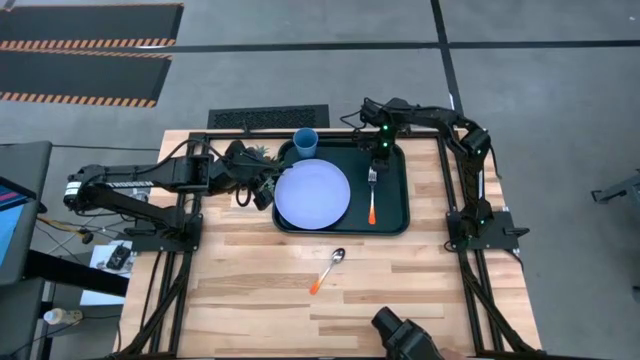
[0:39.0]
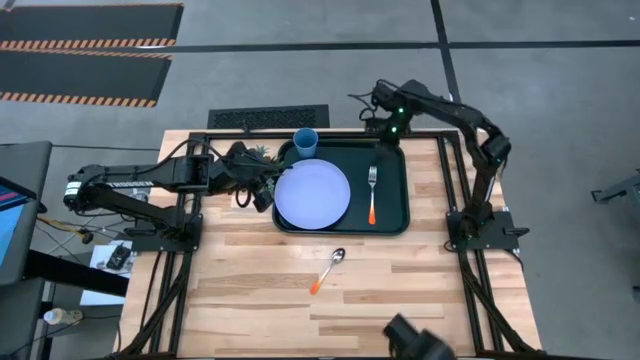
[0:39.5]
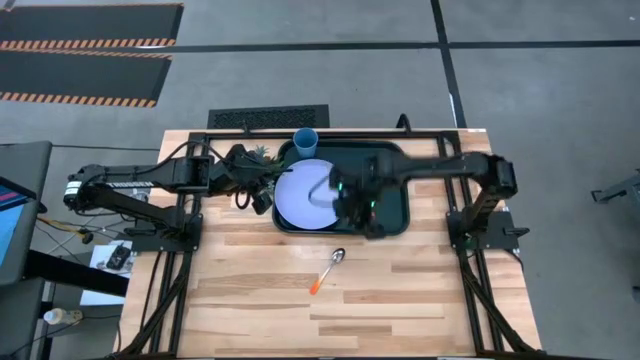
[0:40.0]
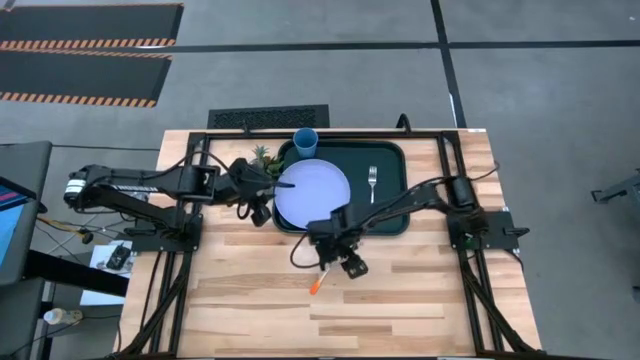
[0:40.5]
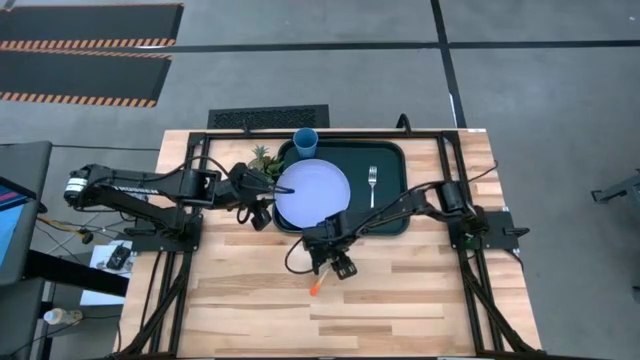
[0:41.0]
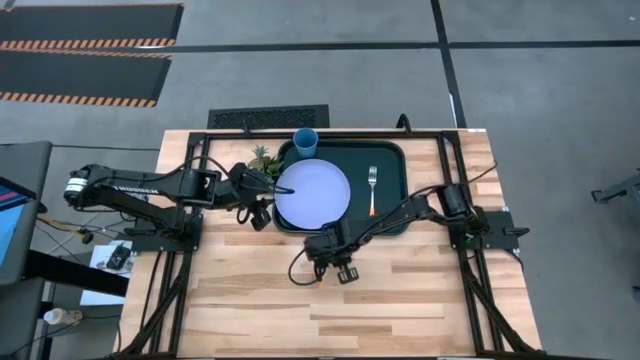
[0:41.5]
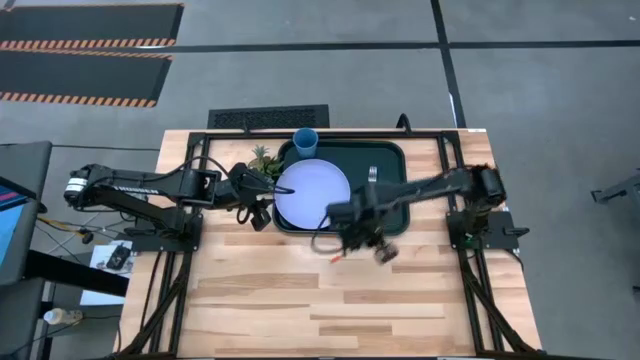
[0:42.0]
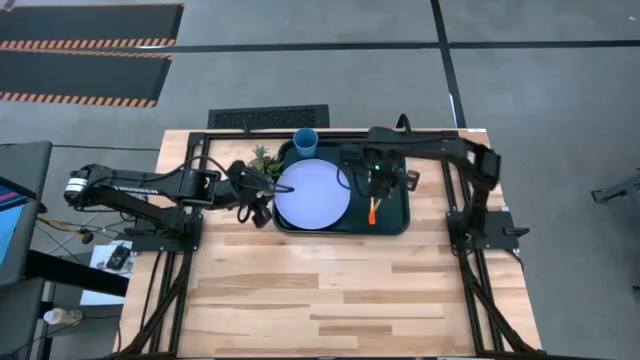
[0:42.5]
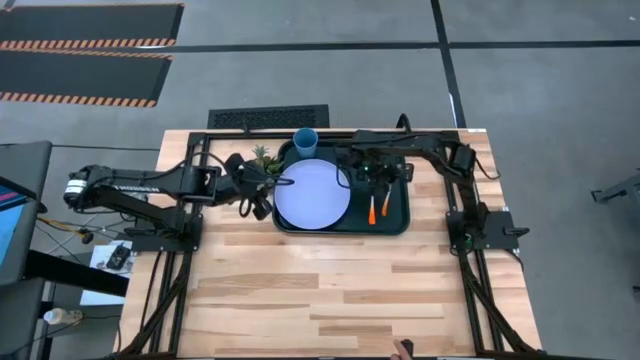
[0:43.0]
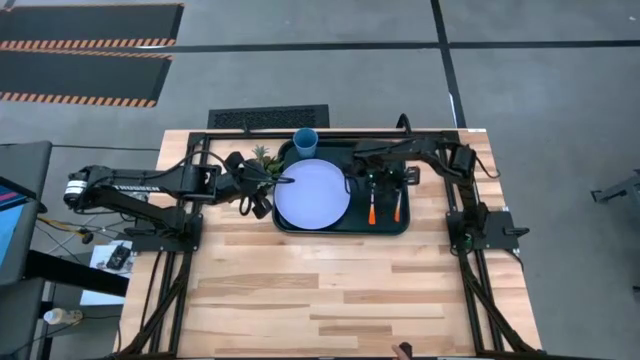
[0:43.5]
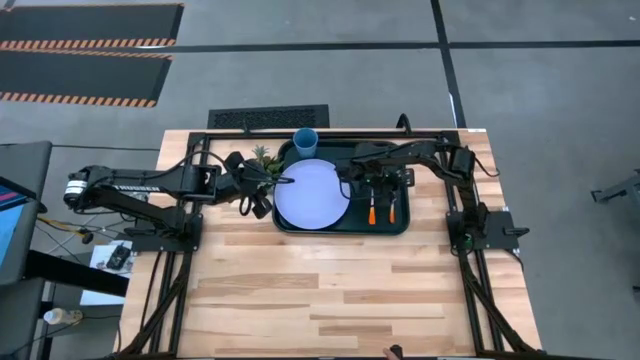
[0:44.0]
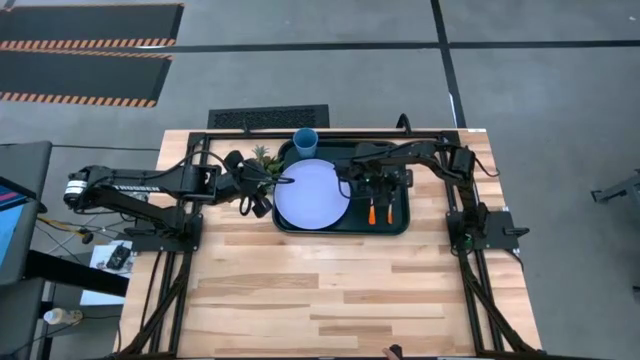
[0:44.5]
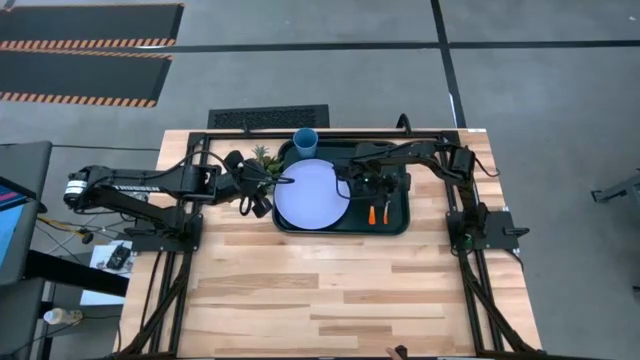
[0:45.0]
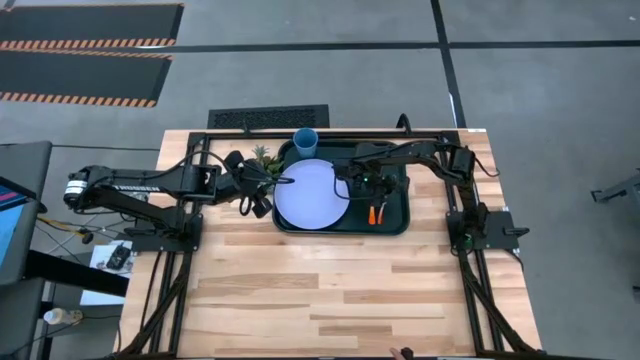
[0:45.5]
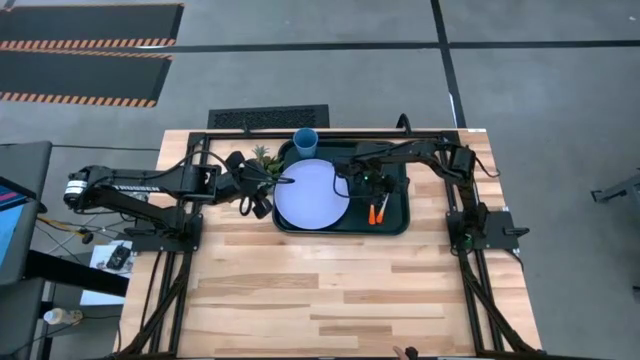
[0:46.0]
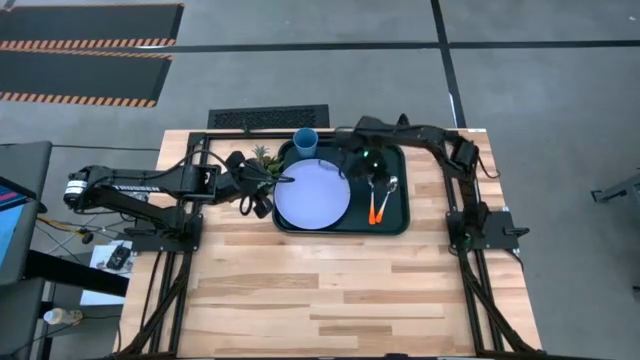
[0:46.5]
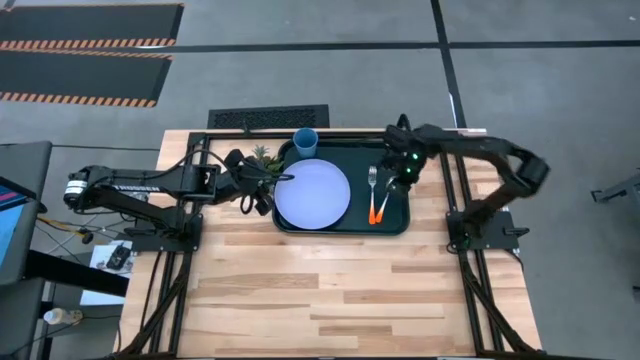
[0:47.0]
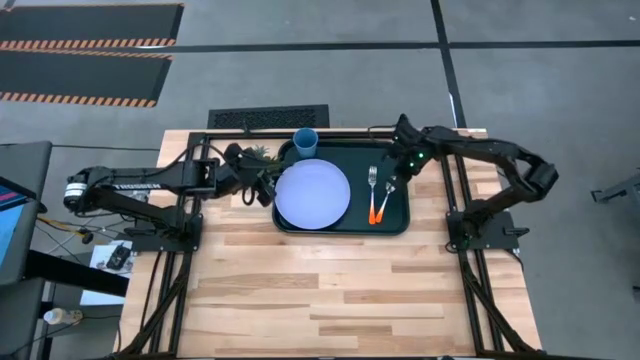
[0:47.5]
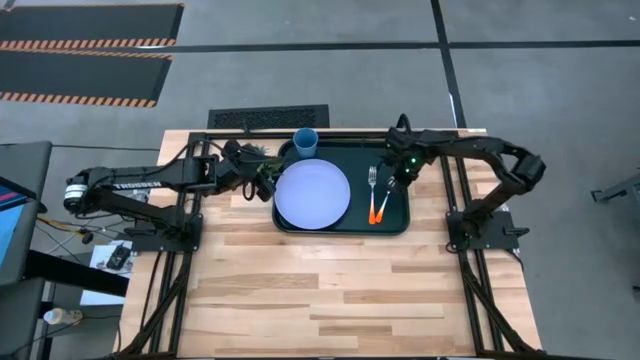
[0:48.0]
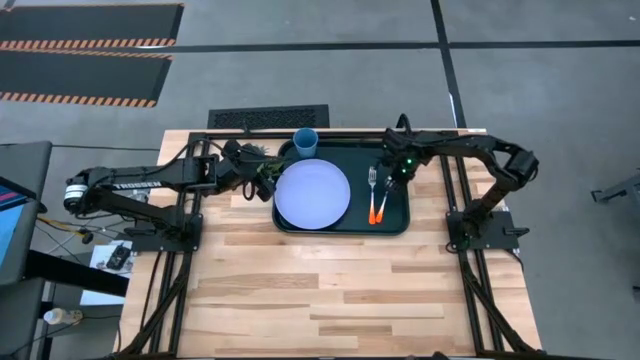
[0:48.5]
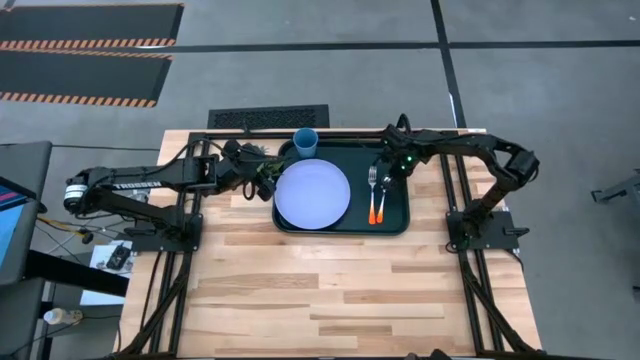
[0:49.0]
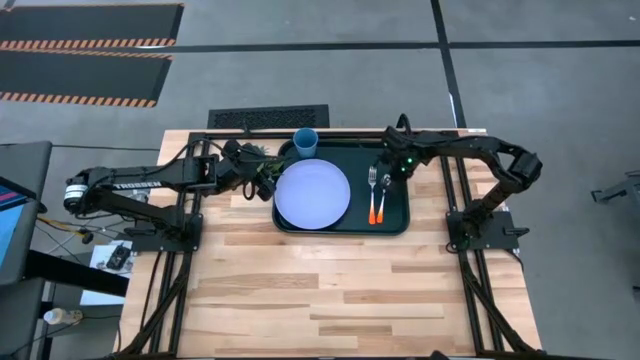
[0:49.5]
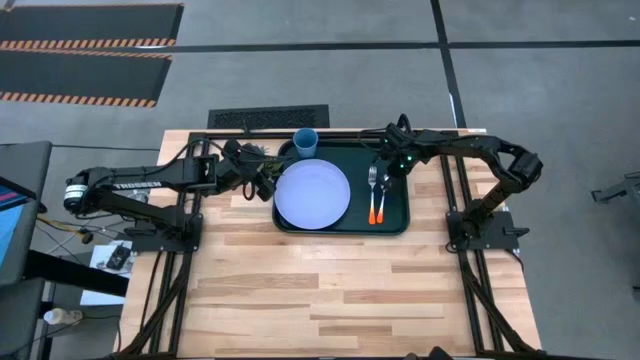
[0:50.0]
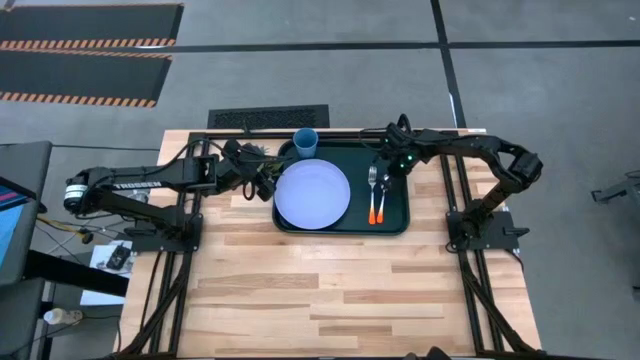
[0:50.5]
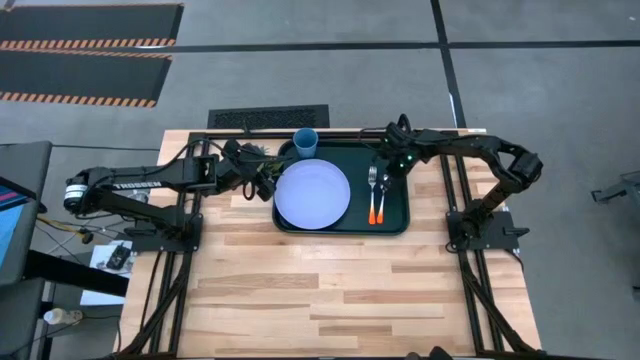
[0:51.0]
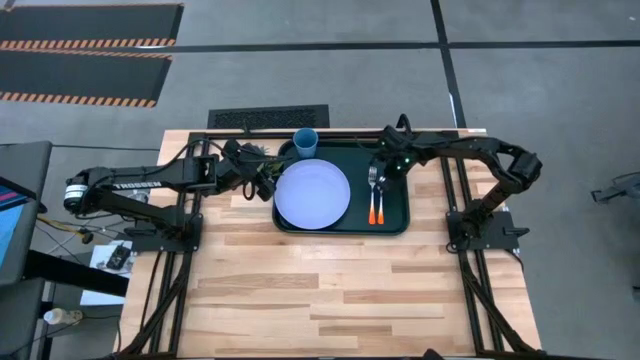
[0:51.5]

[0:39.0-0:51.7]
Task: Pick and place plate/cup/fork/spoon on tray
Put the orange spoon on the black tray

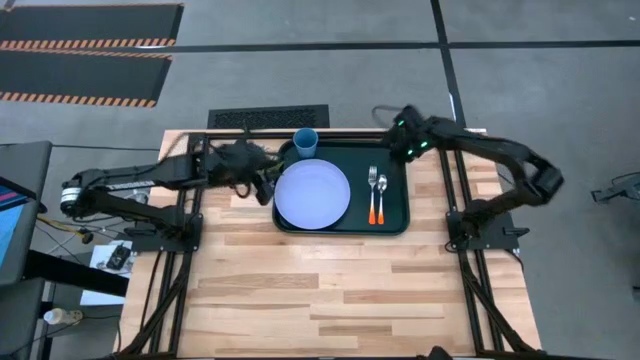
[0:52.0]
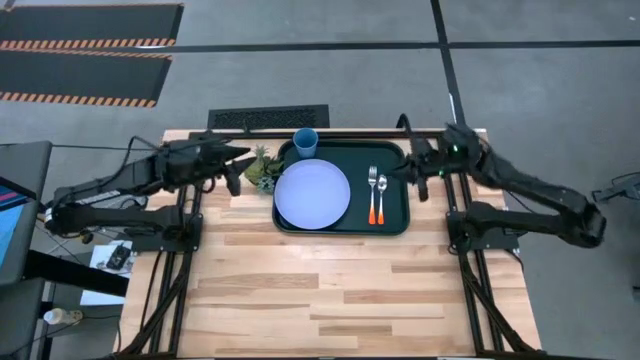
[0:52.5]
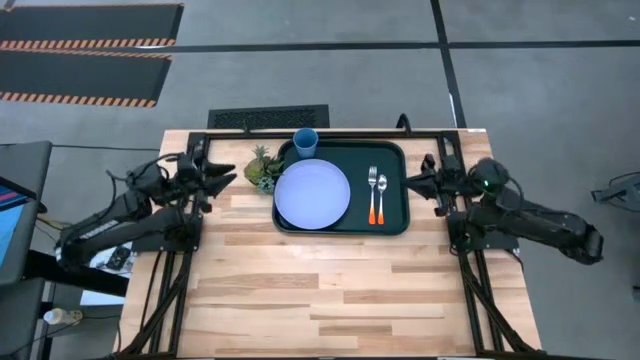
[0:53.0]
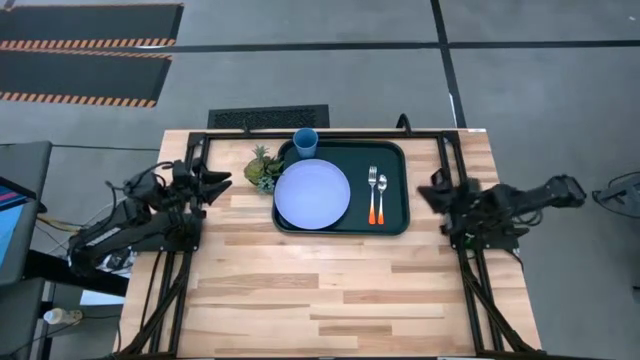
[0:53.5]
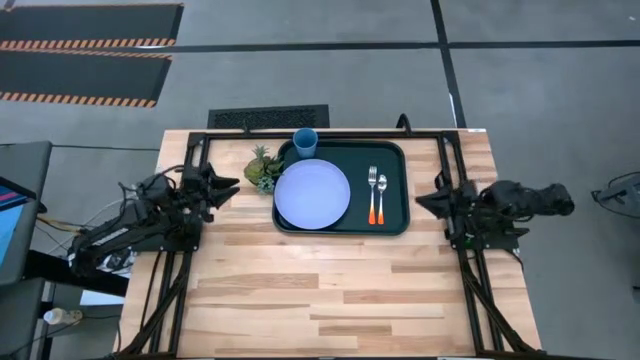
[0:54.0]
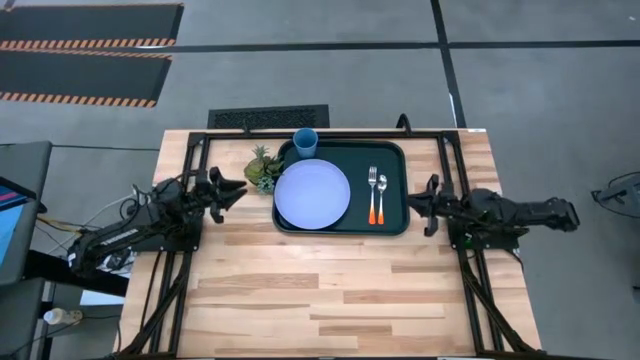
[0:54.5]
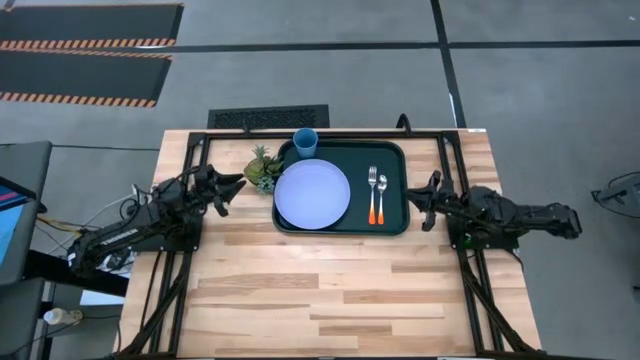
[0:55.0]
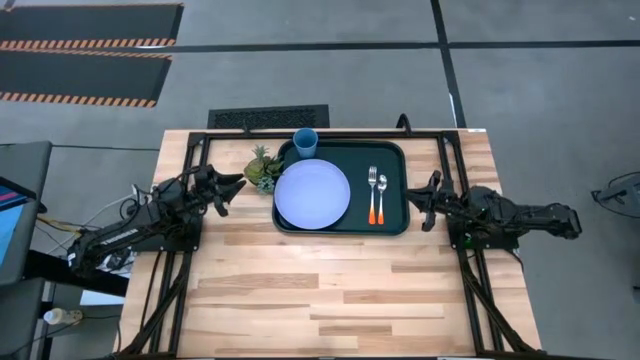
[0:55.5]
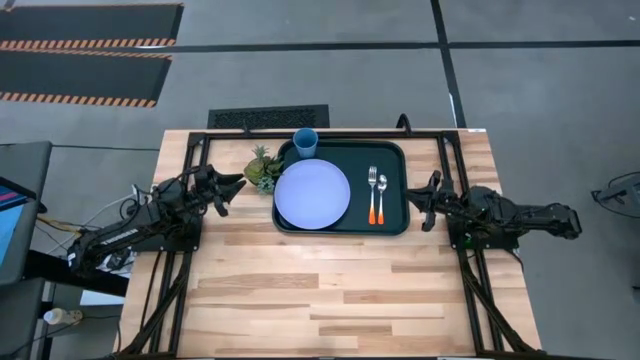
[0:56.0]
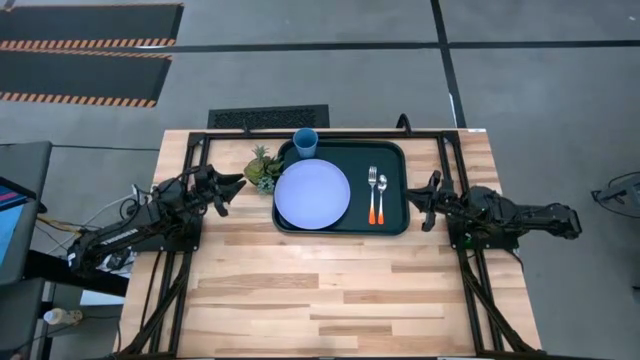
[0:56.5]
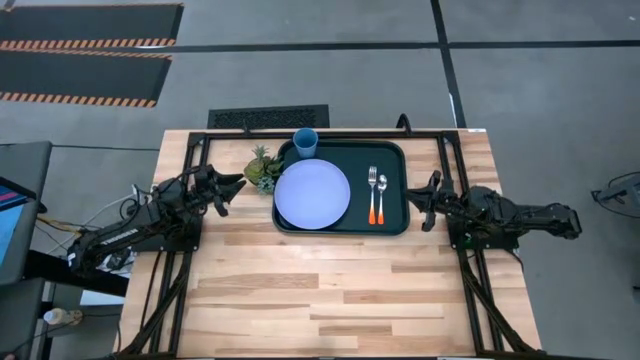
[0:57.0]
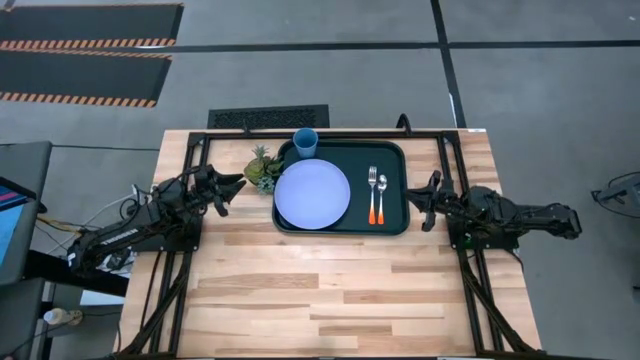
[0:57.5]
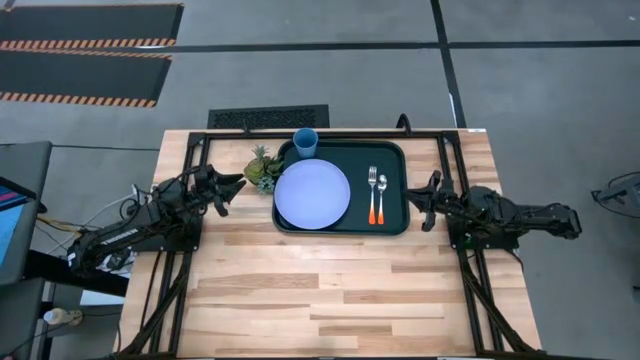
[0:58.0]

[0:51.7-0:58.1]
Return to Home Position

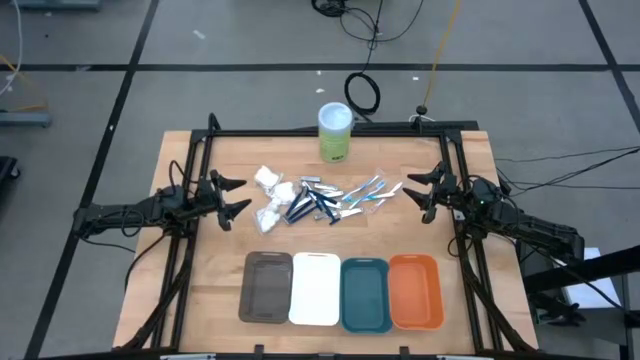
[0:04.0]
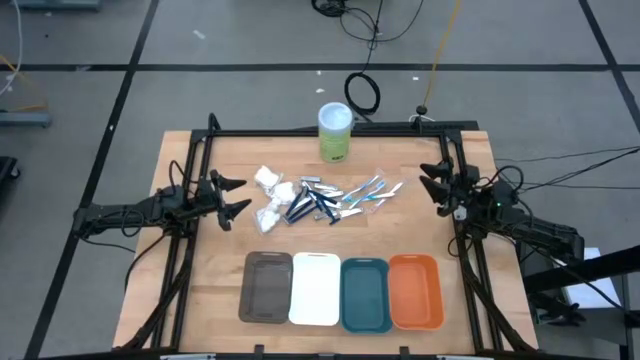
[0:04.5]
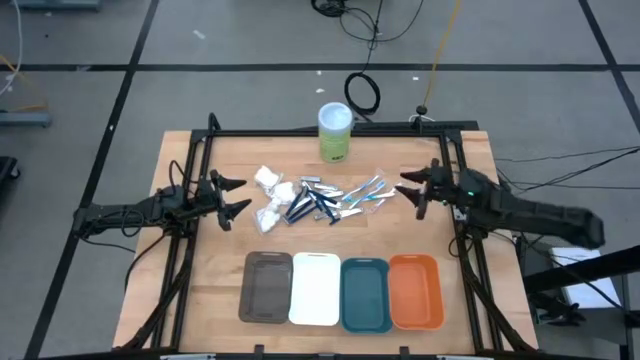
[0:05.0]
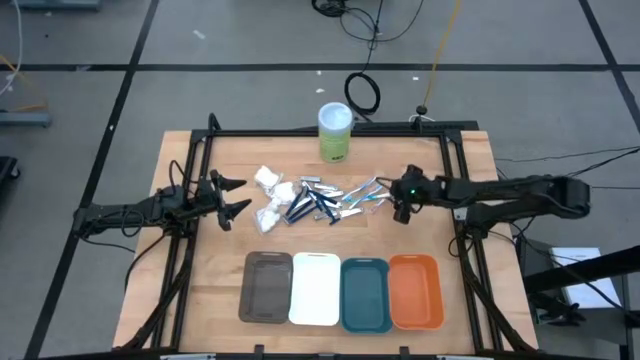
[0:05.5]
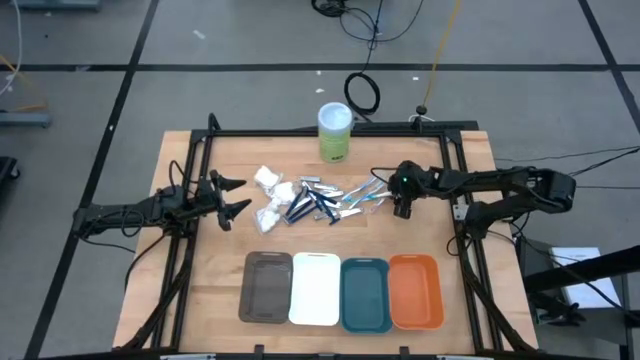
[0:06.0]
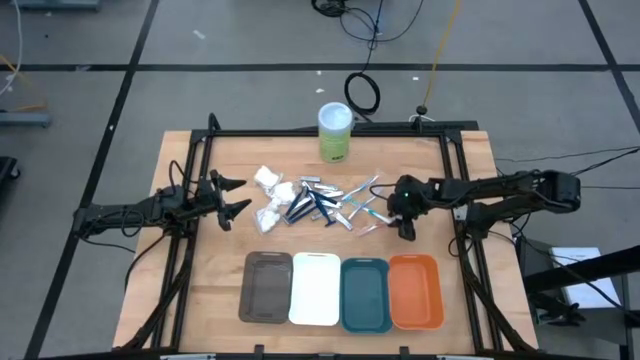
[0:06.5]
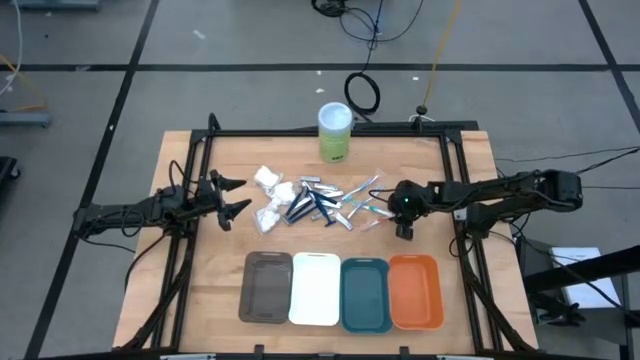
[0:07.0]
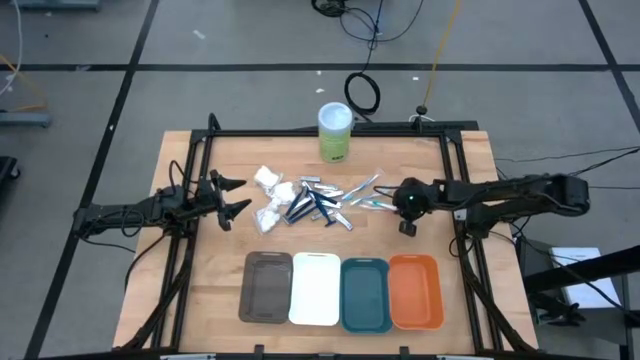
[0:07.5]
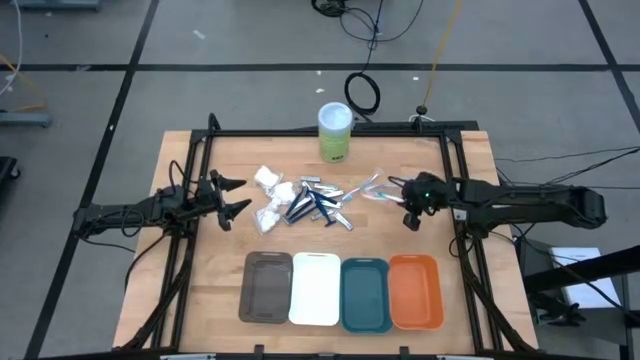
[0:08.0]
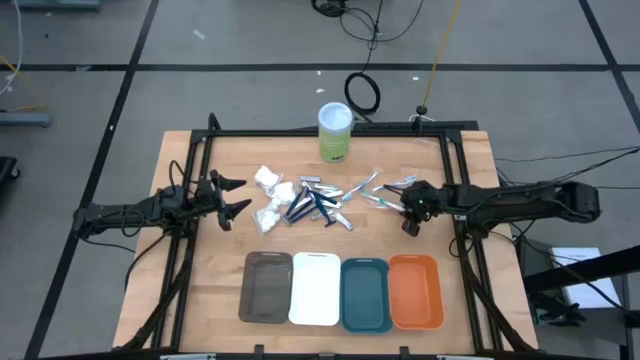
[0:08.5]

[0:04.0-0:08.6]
Task: Pick & Place Travel size toiletries
Put the red toothbrush into the black bin
